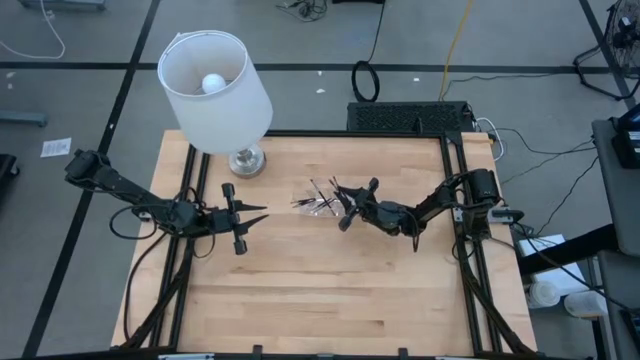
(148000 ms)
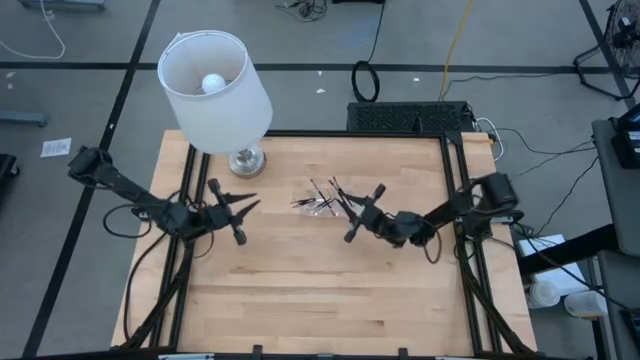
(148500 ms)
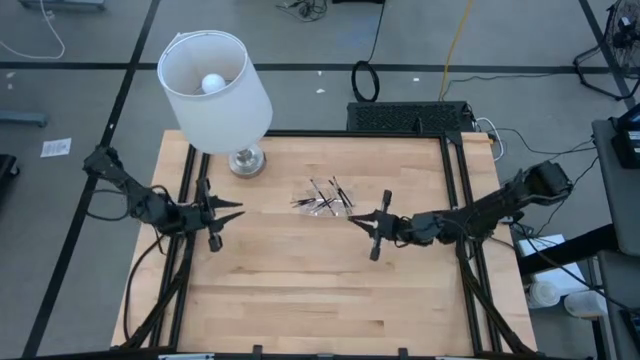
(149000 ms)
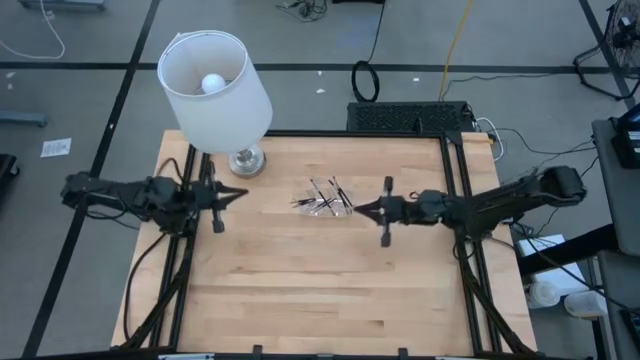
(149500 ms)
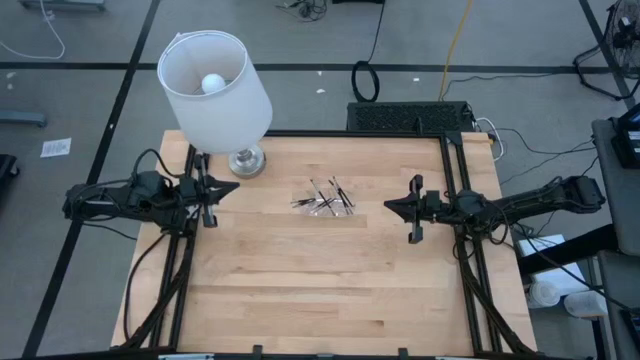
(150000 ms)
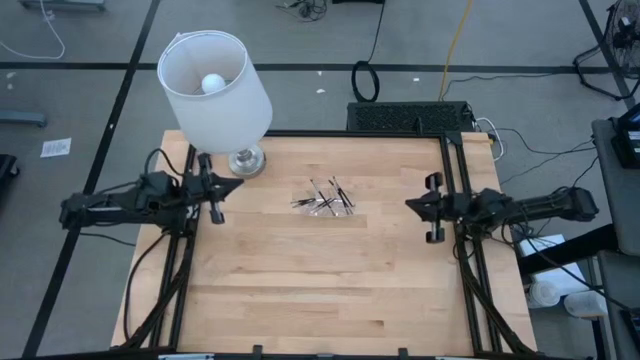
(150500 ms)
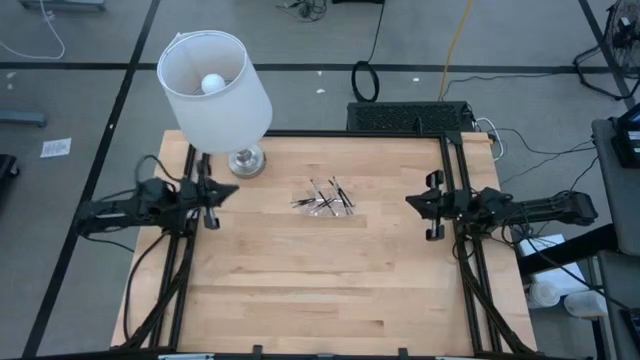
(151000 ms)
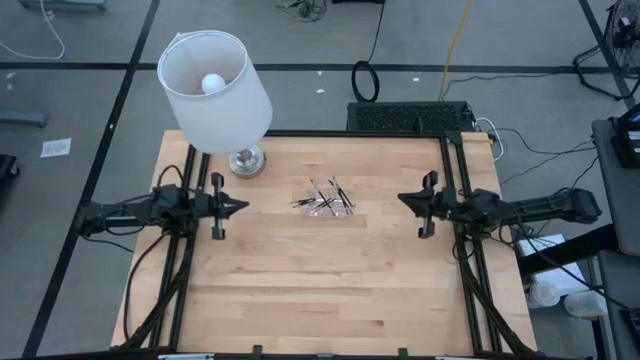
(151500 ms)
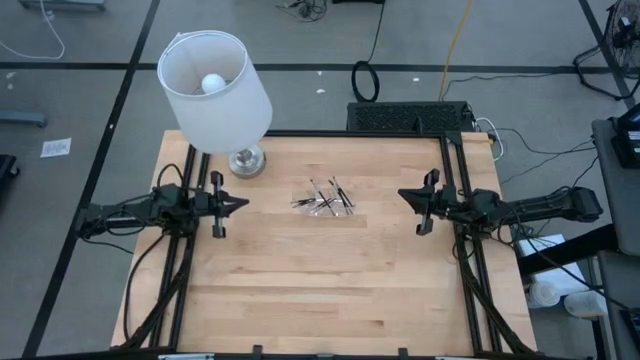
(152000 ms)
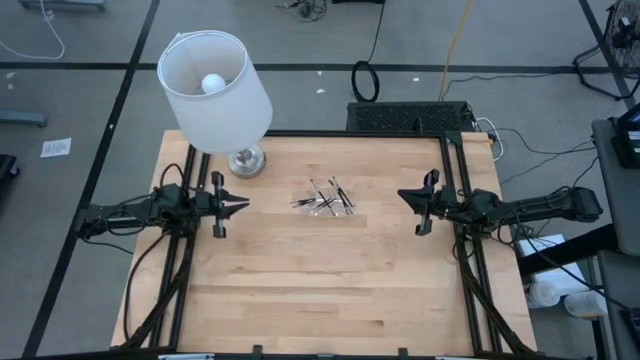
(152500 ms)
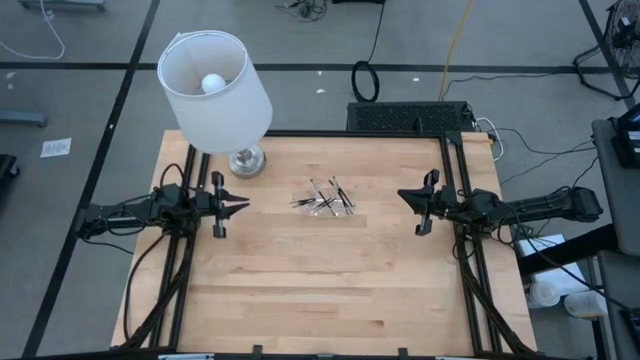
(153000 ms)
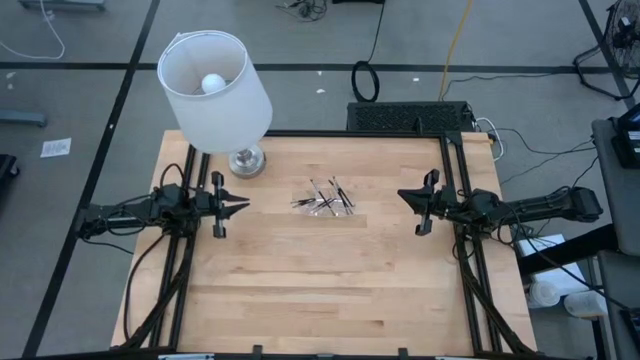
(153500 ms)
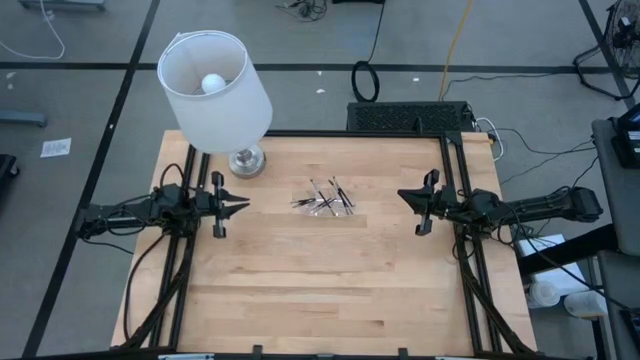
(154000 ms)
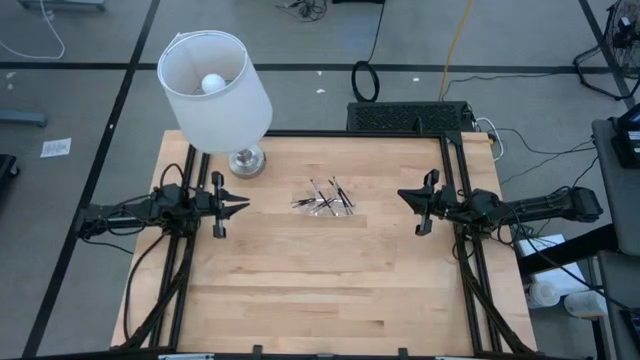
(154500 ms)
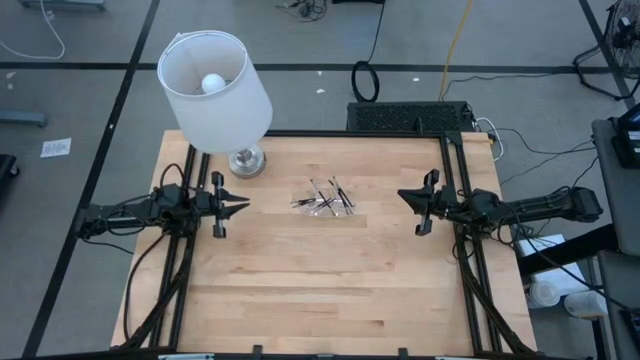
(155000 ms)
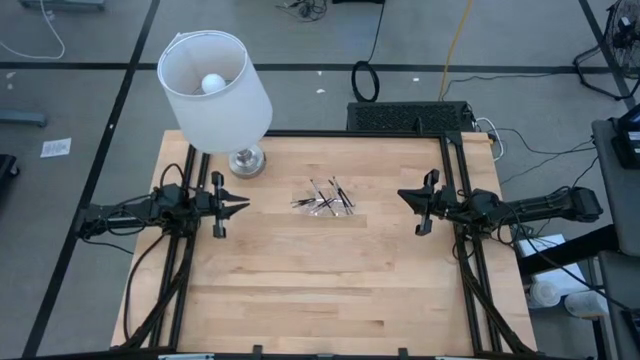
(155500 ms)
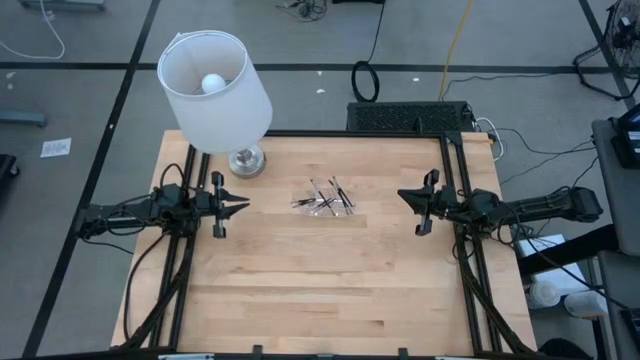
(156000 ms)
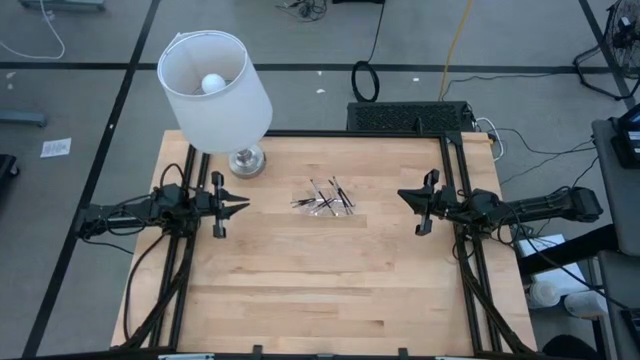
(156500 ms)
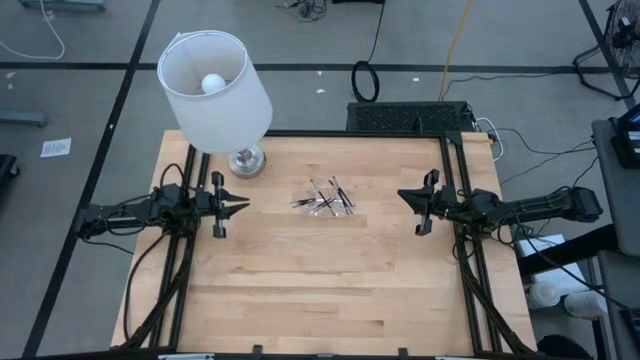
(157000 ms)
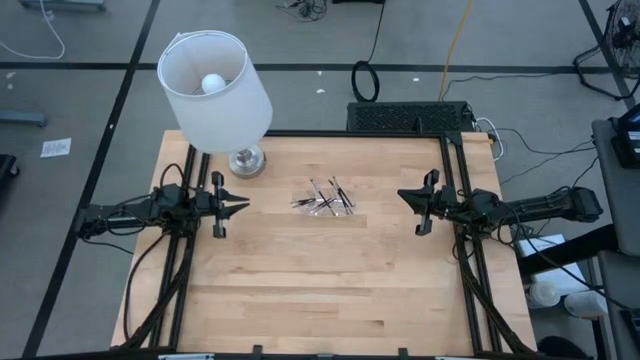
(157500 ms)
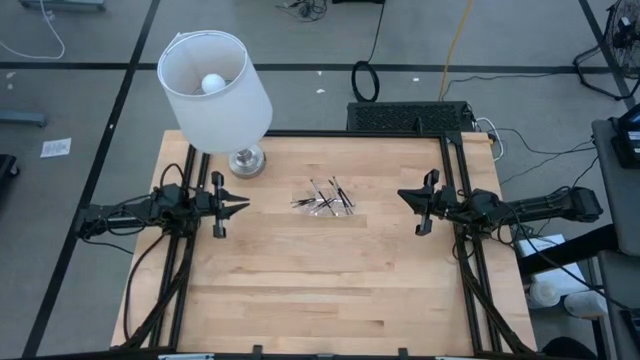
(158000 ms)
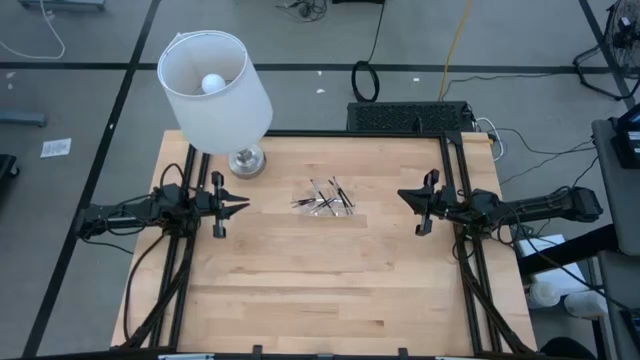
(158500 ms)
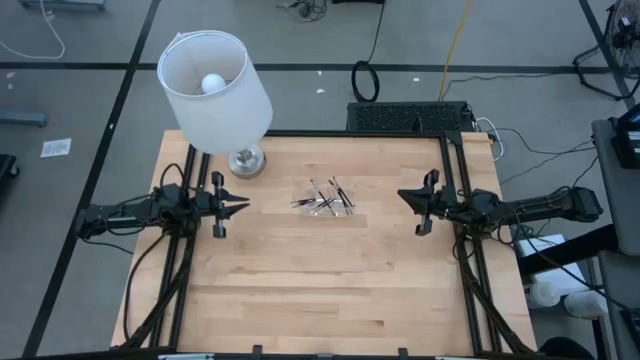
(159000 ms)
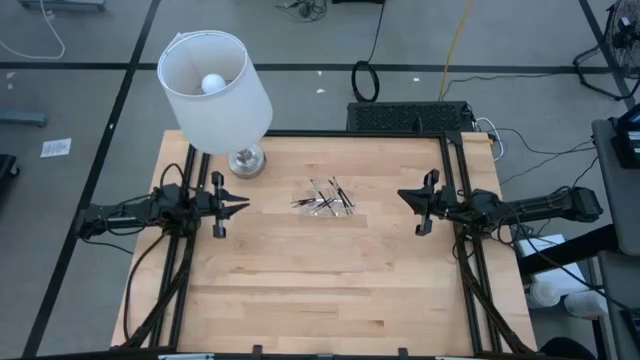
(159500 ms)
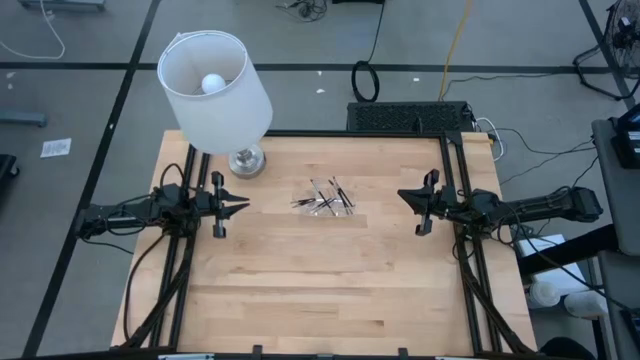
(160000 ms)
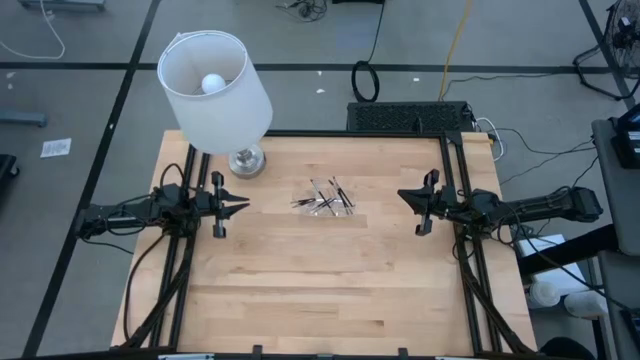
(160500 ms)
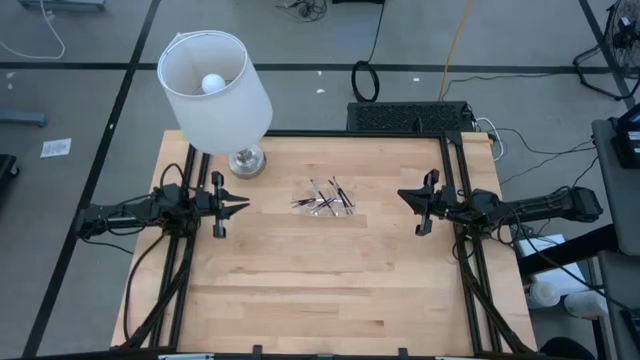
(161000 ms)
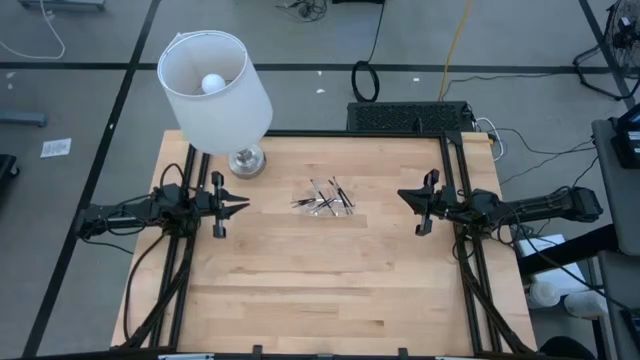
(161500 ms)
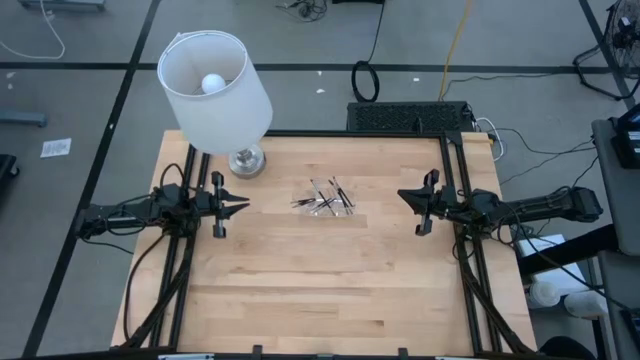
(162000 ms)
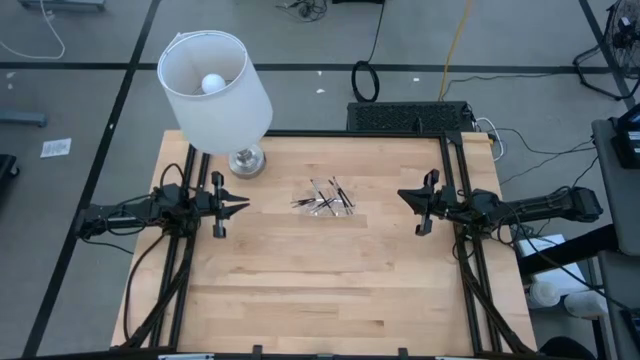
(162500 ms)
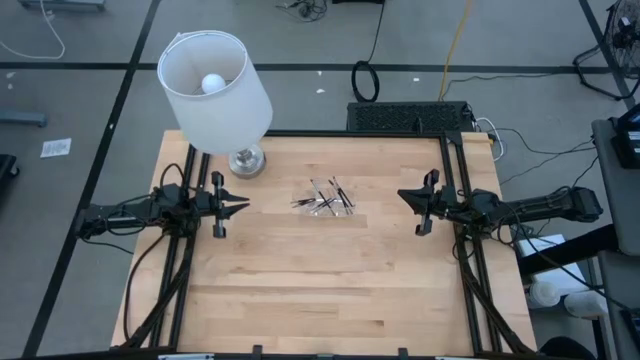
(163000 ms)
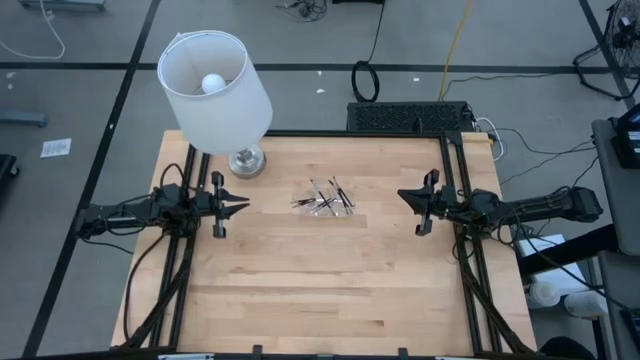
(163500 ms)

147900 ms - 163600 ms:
Task: Put items in baskets/containers
Return to Home Position

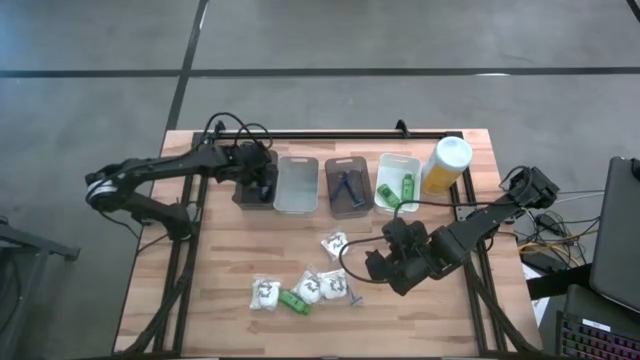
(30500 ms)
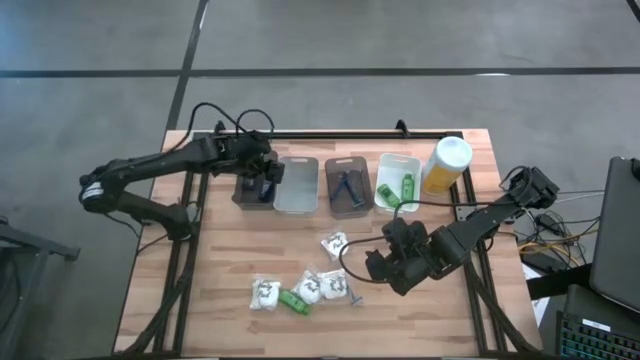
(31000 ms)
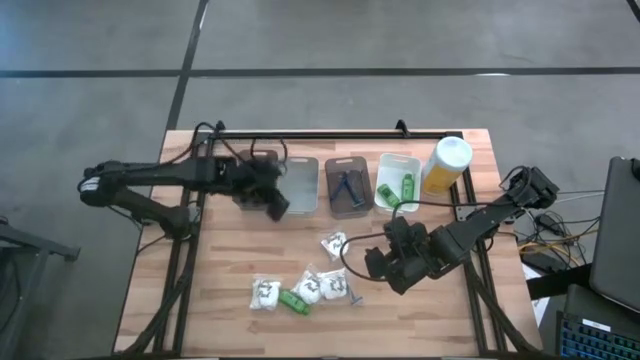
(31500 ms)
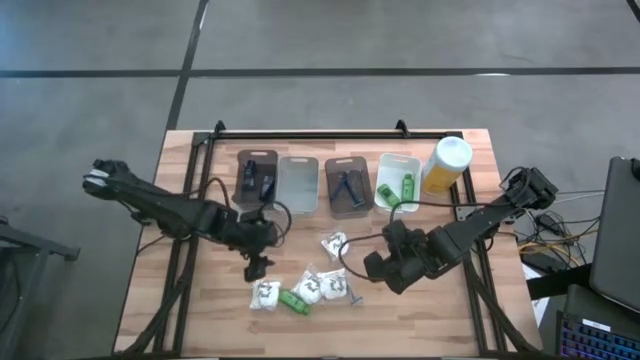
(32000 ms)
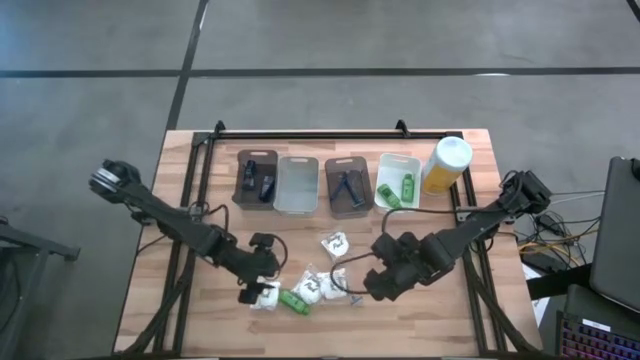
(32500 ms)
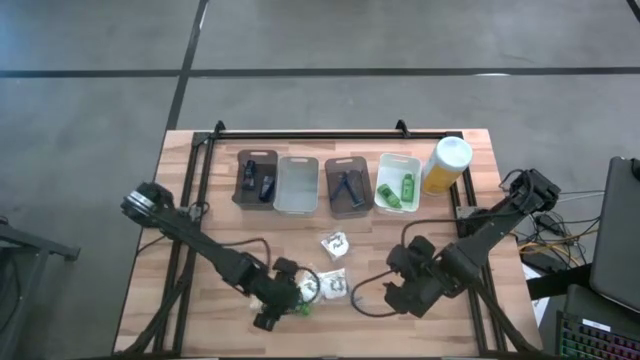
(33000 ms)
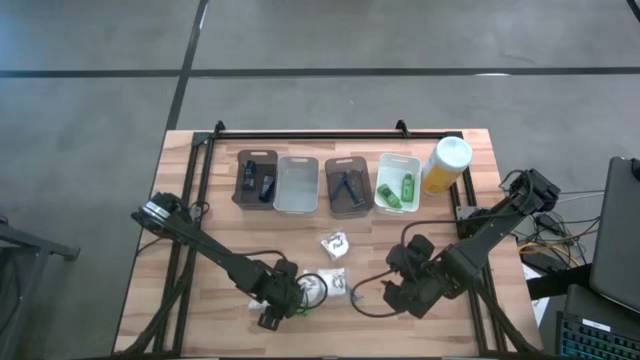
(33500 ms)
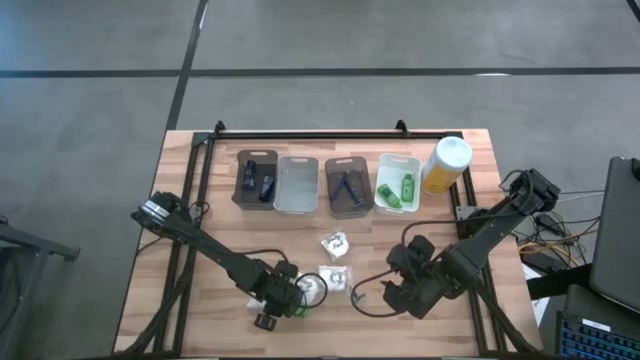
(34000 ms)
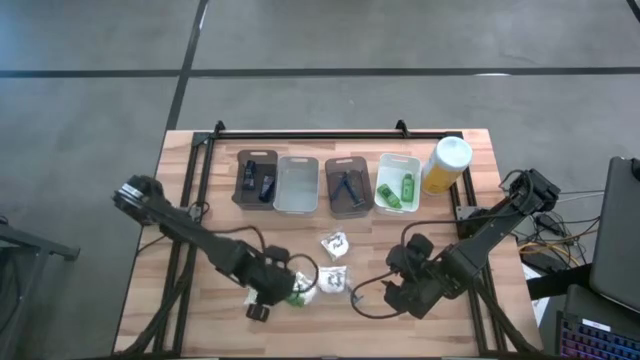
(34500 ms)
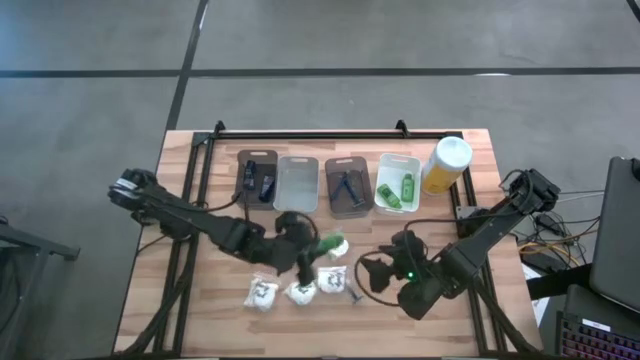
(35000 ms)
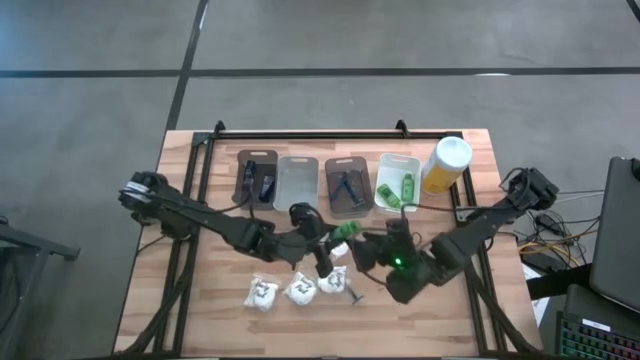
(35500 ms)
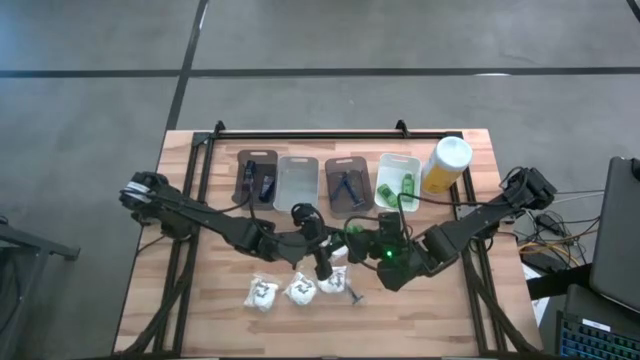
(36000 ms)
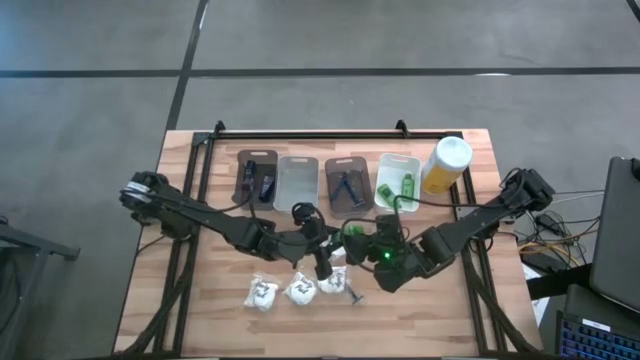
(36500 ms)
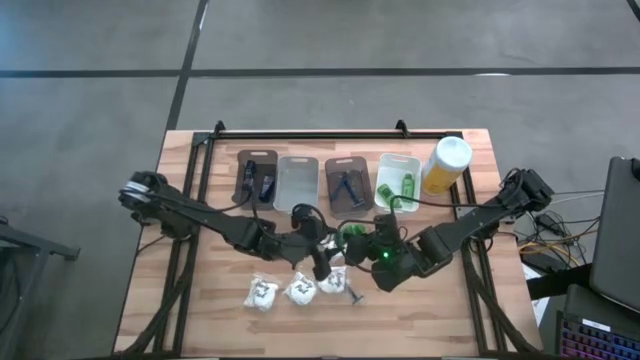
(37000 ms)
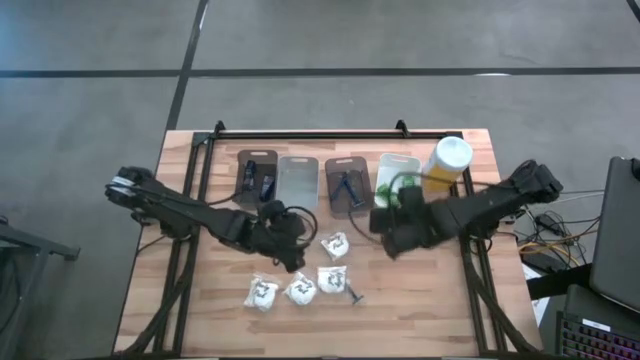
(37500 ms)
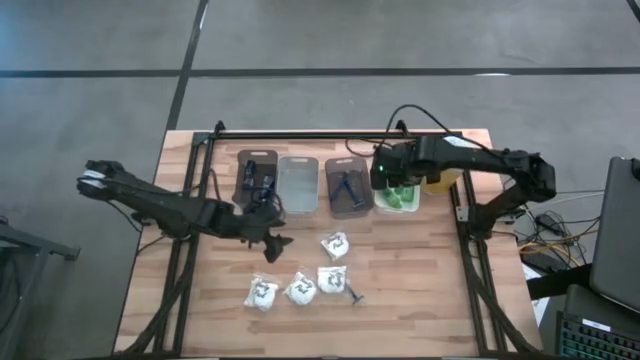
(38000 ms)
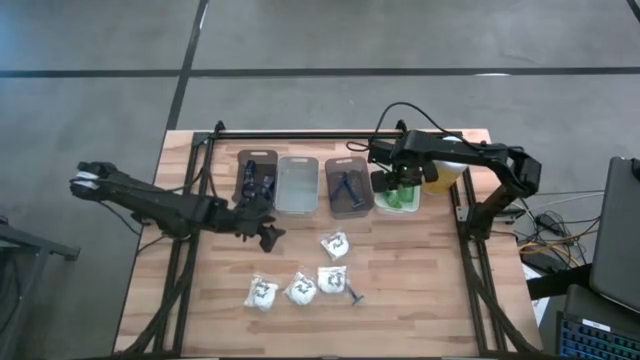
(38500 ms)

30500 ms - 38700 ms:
Task: Pick & Place Travel size toiletries
Put the green shampoo into the white bin
